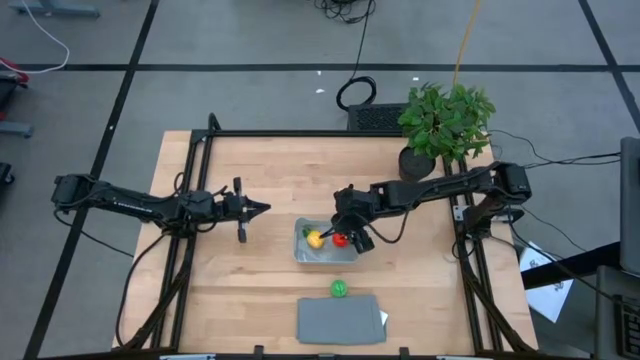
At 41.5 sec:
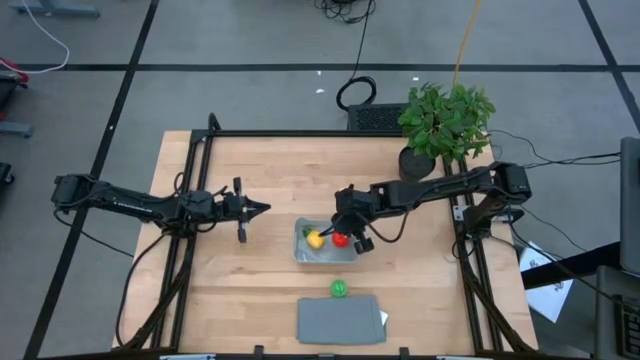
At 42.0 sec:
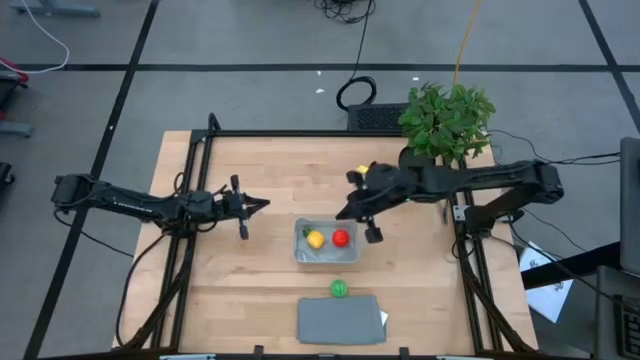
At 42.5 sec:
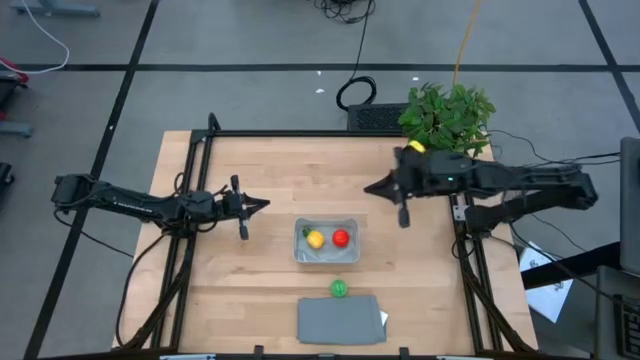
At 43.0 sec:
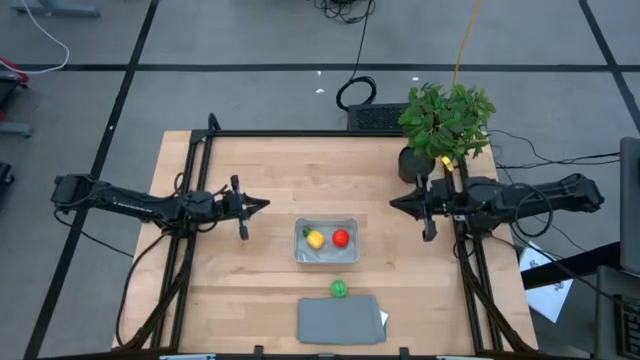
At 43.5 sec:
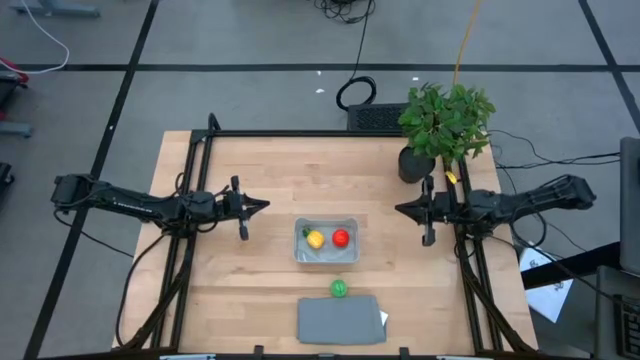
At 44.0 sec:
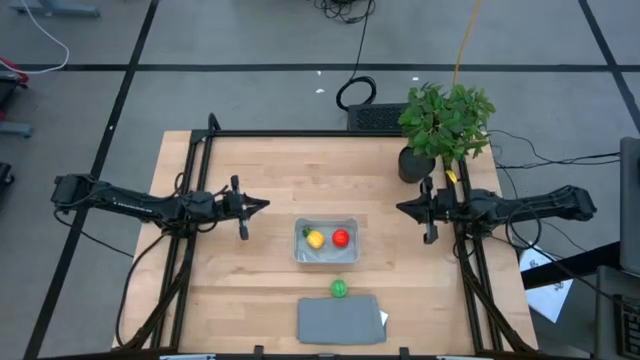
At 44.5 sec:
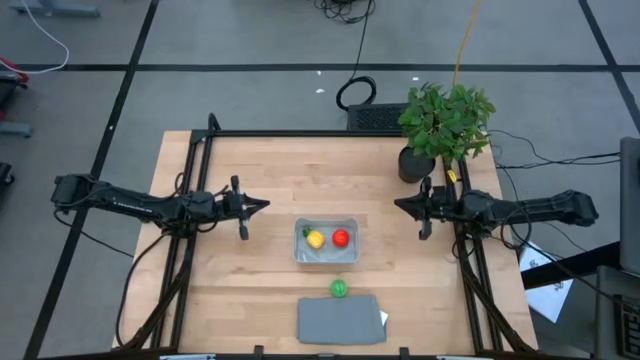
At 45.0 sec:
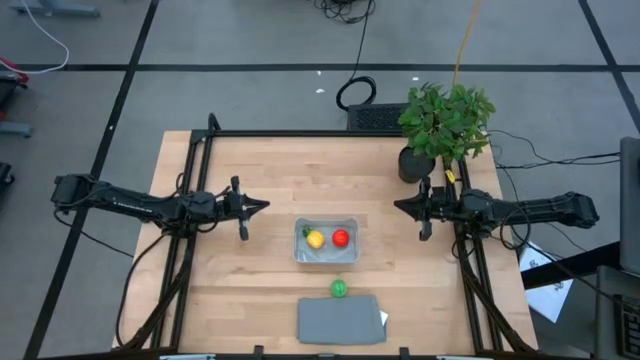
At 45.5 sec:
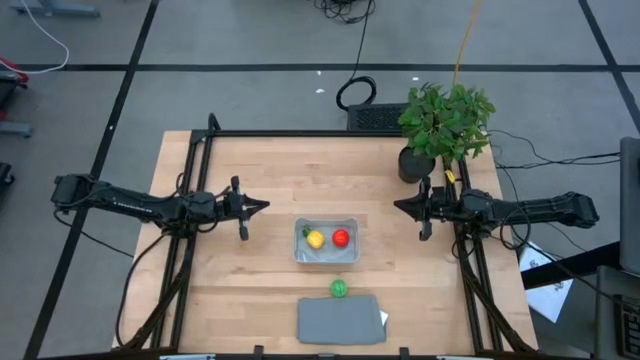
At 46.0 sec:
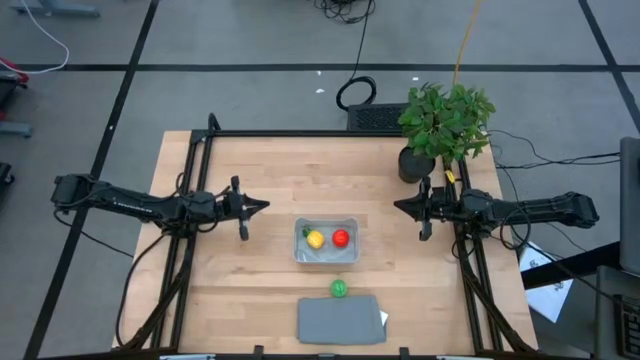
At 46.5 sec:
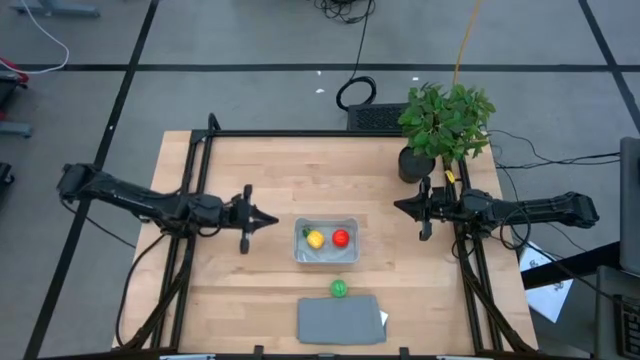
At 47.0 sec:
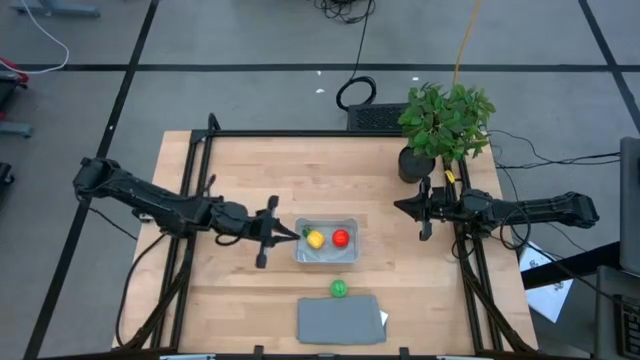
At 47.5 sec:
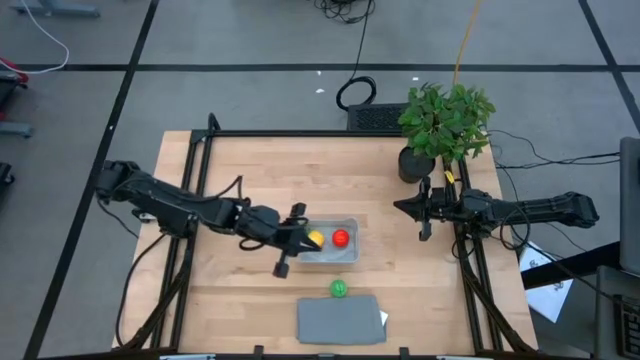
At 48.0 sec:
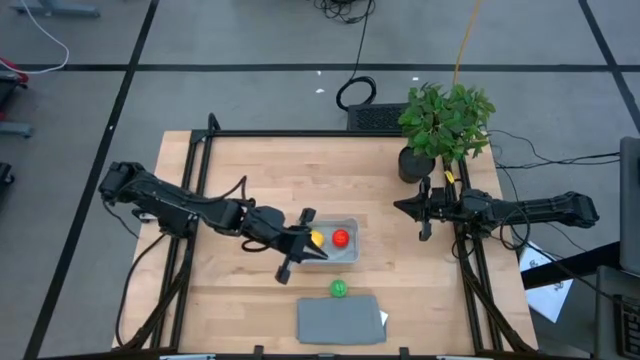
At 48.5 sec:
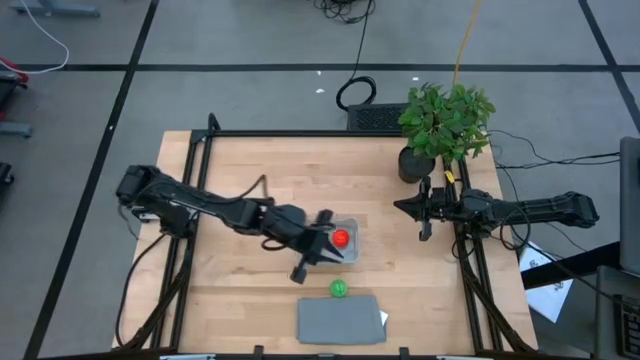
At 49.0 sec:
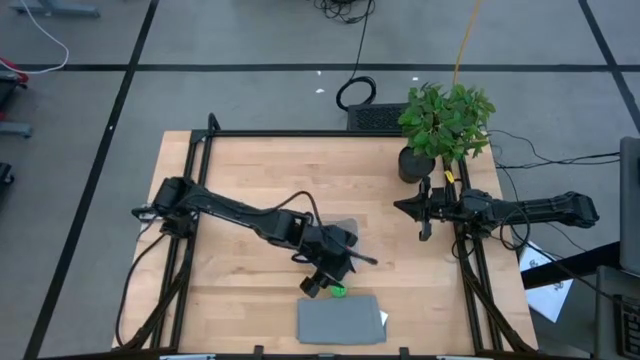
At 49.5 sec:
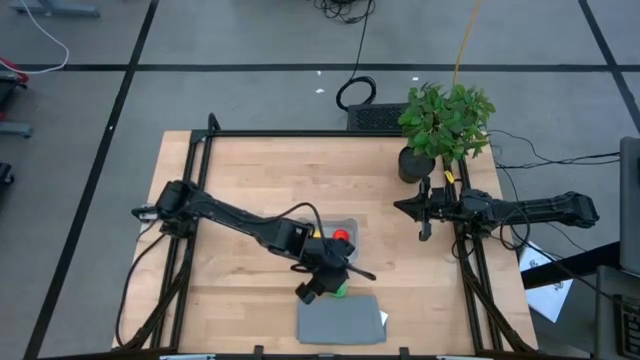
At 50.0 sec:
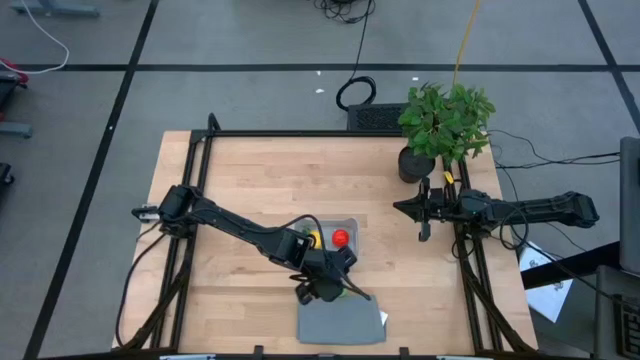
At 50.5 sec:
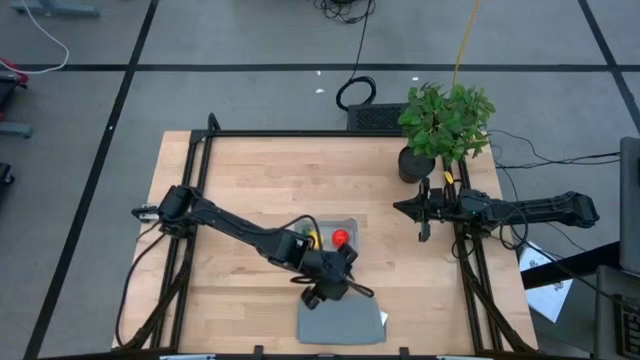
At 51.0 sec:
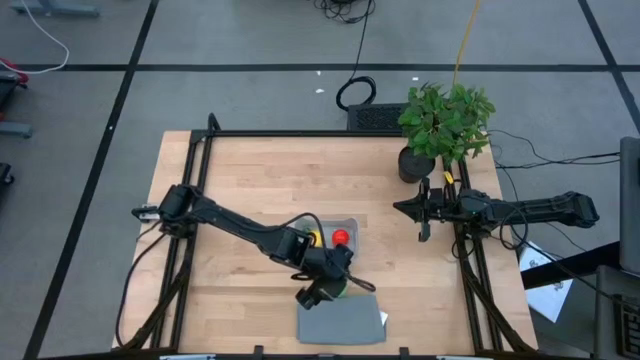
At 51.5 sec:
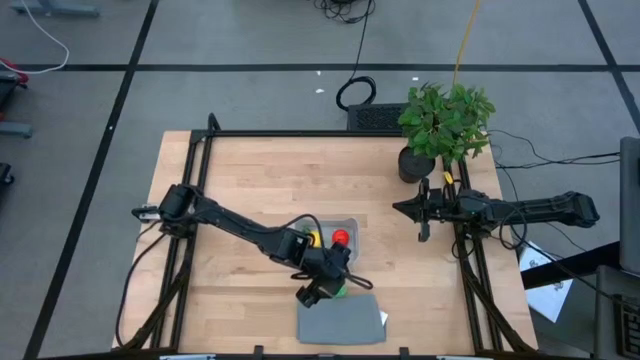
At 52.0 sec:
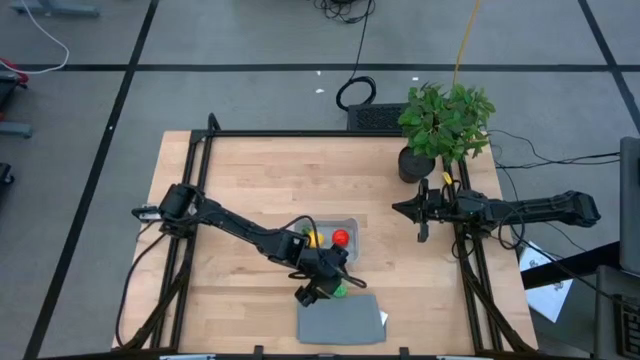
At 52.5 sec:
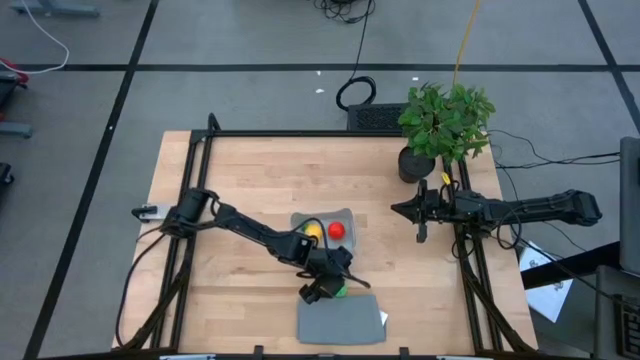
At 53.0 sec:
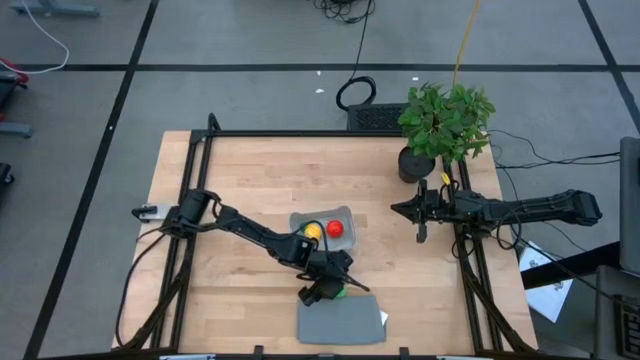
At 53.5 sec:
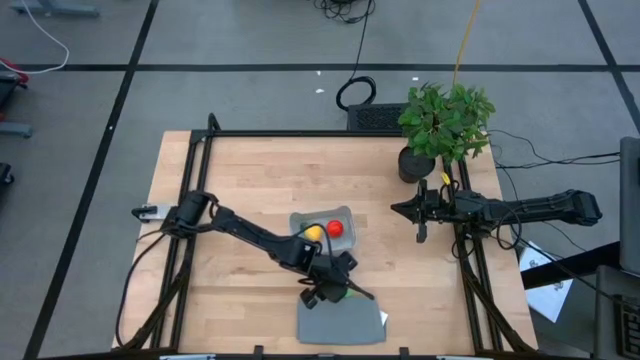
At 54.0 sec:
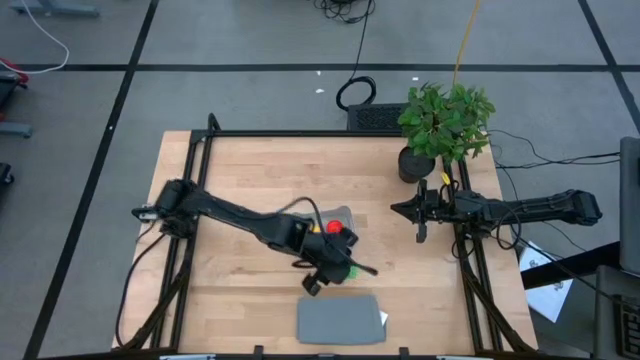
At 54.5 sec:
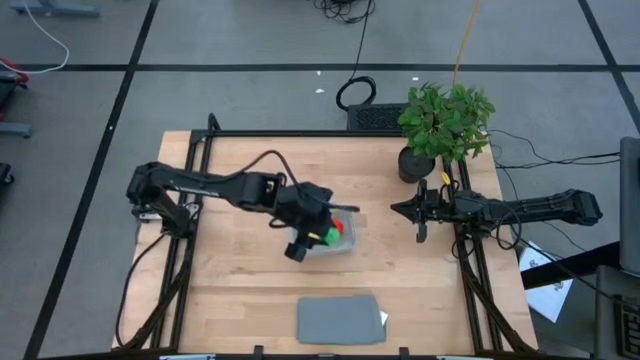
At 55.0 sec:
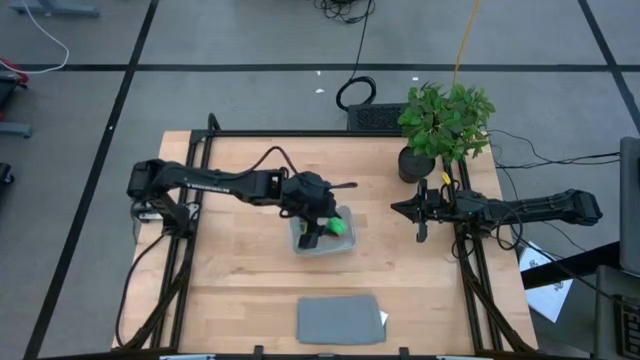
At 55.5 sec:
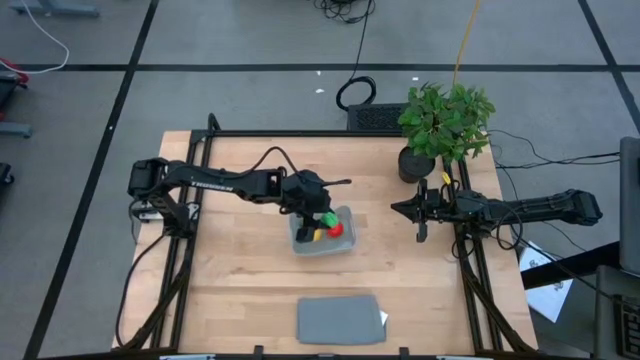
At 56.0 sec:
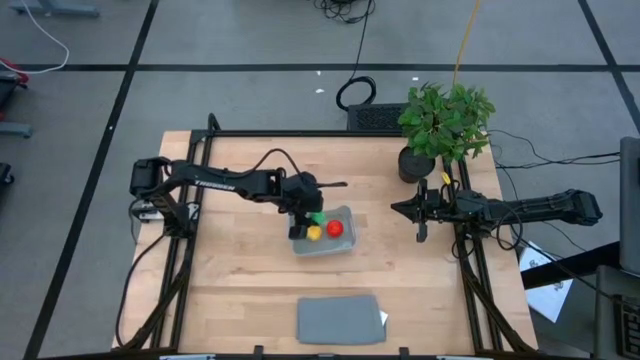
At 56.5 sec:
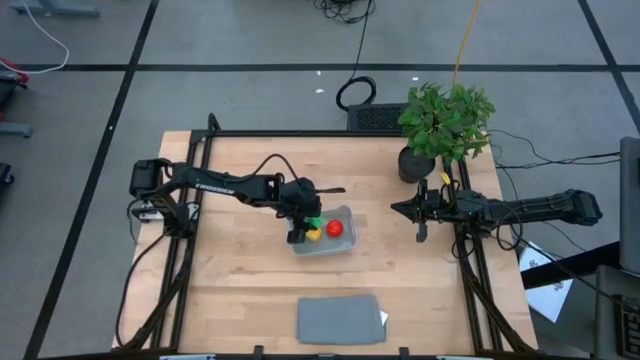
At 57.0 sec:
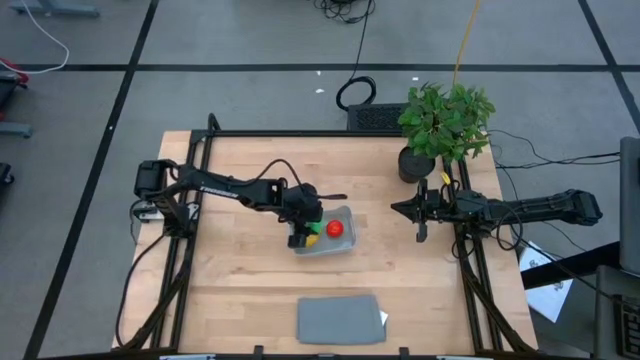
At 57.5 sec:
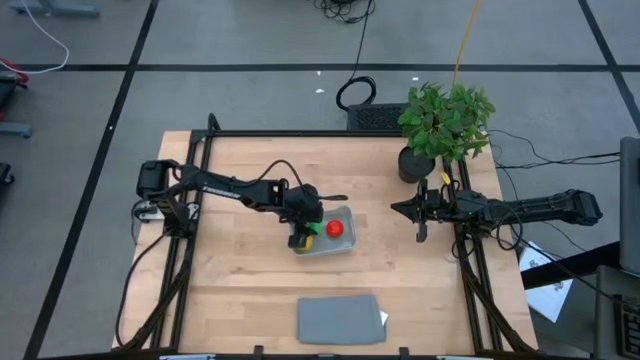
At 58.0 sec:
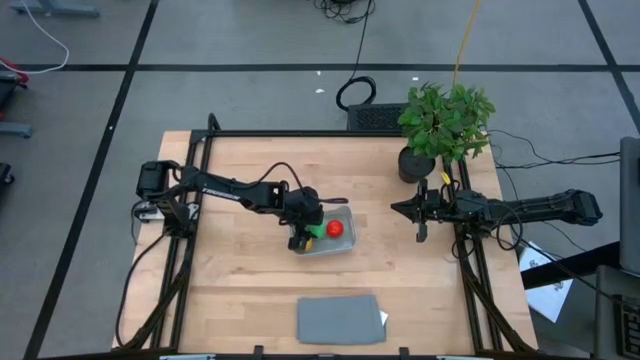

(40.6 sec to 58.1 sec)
Task: Pick and placing Produce into tupperware
Put the green pear into the gray bin

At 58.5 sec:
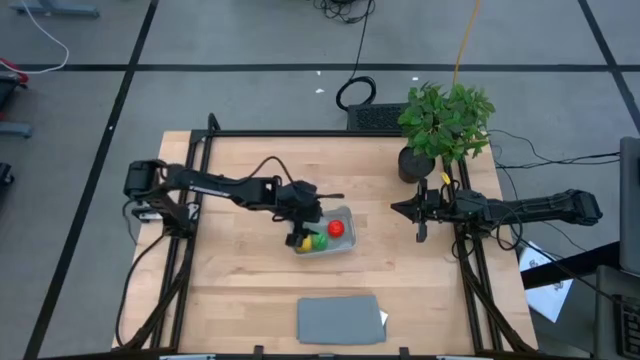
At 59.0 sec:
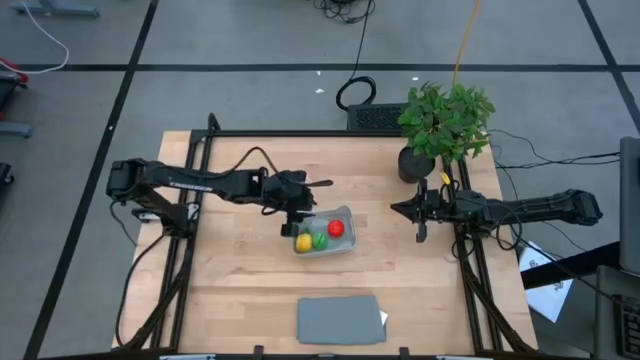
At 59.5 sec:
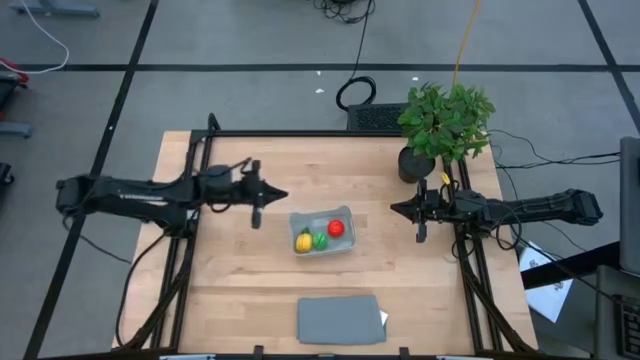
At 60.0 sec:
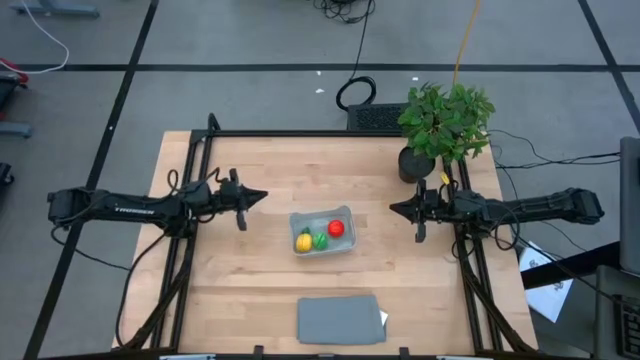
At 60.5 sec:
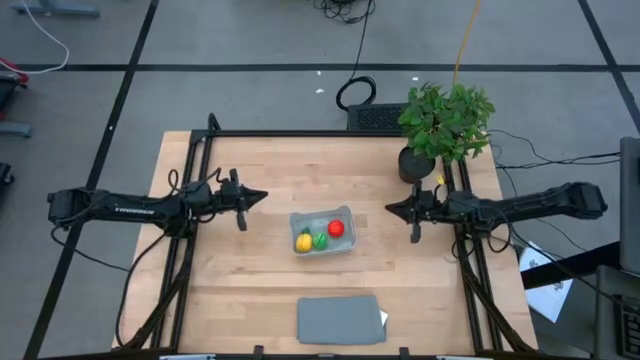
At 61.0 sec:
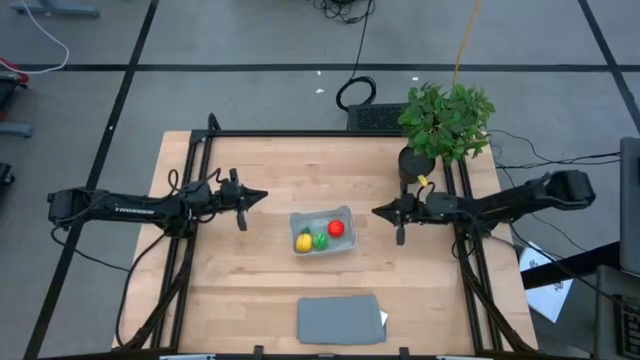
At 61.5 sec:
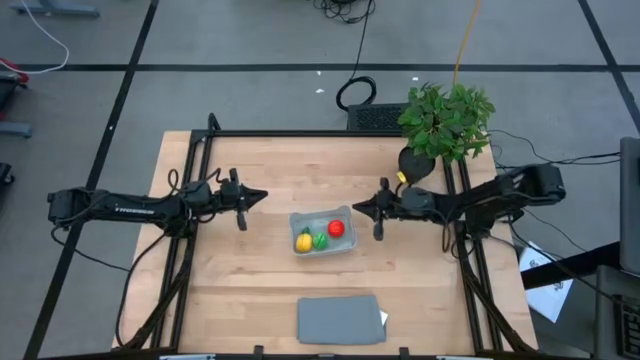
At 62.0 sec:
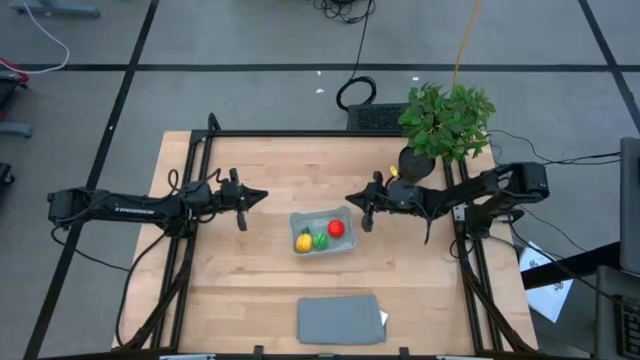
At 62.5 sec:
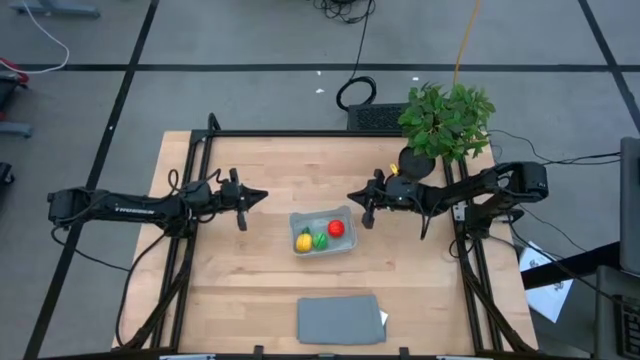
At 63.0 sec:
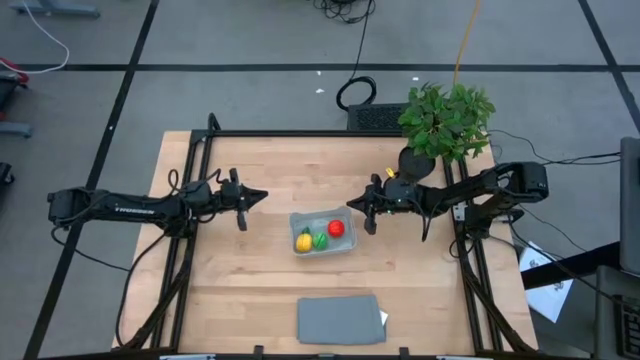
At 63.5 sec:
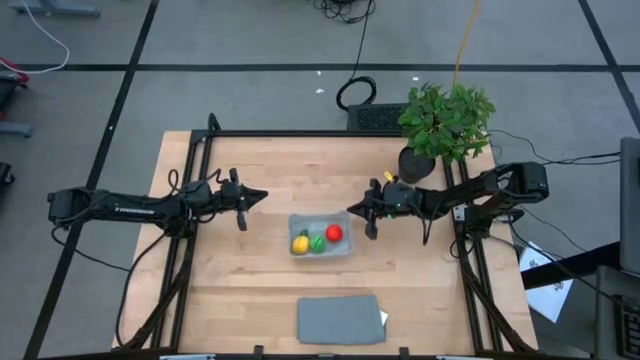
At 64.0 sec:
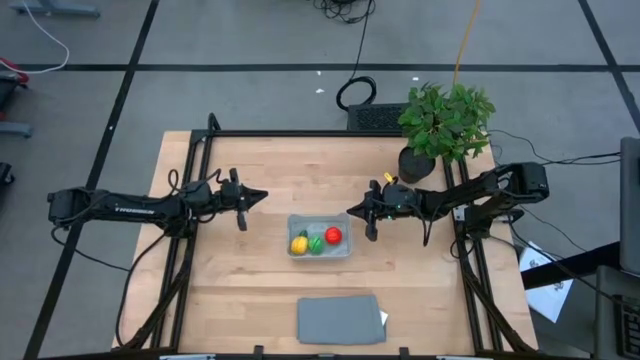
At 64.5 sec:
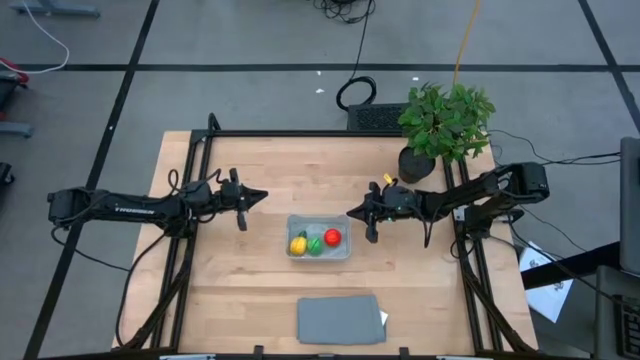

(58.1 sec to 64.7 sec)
Adjust the gray bin on the table
